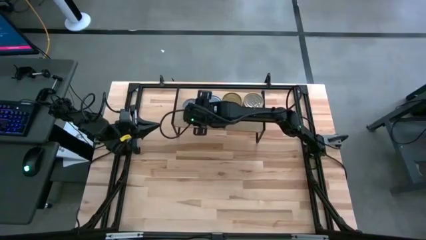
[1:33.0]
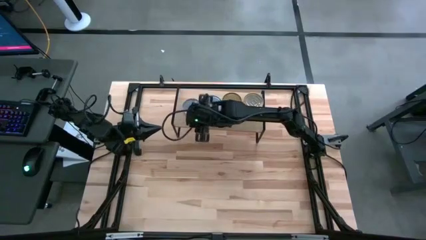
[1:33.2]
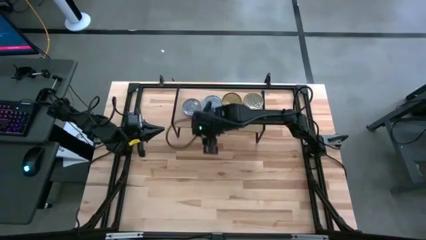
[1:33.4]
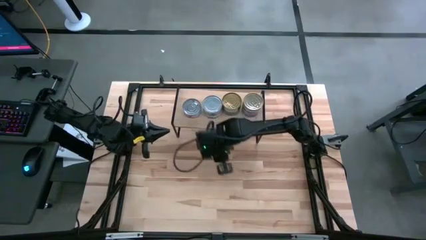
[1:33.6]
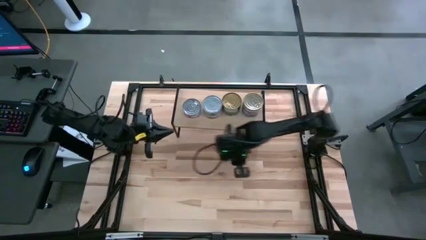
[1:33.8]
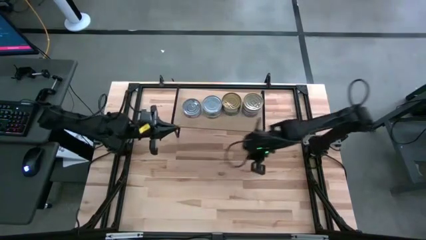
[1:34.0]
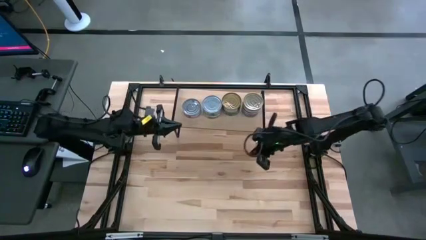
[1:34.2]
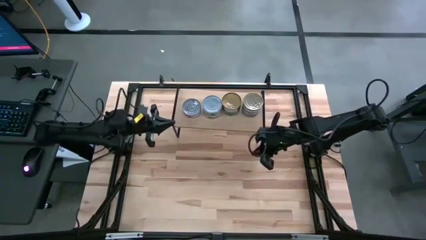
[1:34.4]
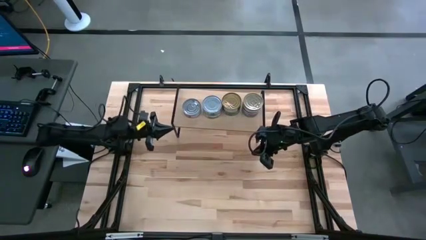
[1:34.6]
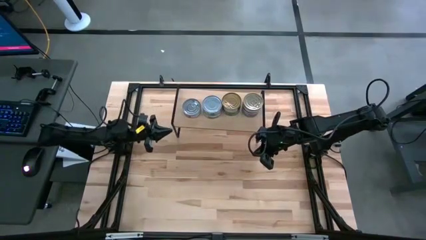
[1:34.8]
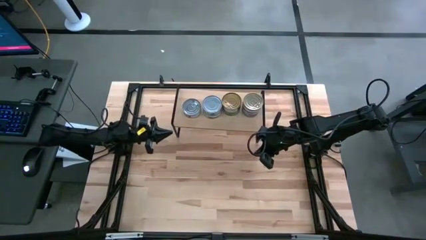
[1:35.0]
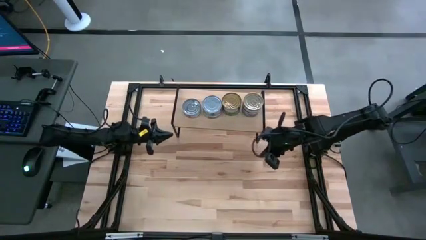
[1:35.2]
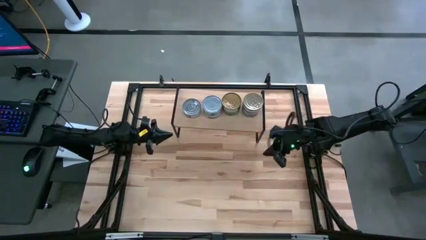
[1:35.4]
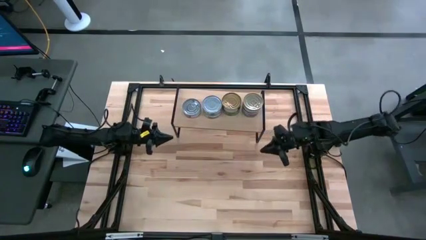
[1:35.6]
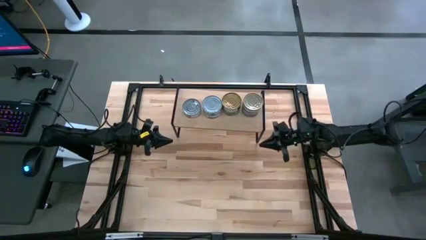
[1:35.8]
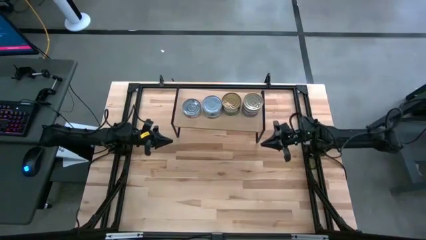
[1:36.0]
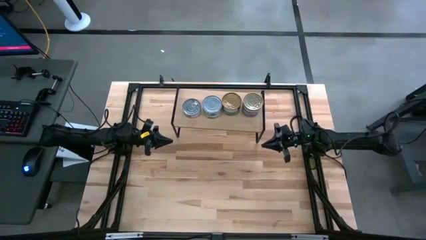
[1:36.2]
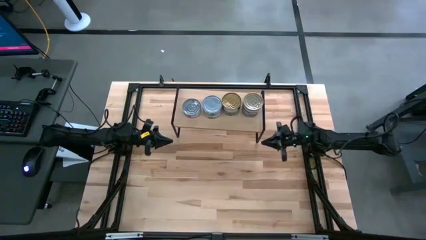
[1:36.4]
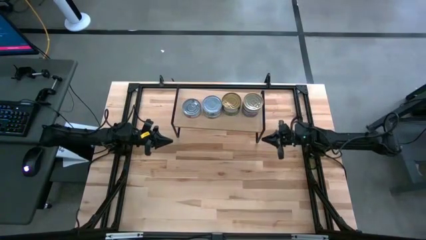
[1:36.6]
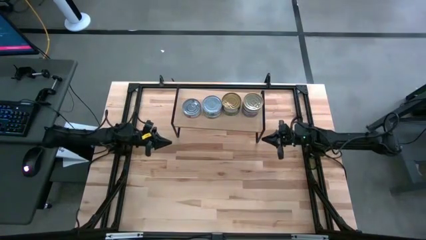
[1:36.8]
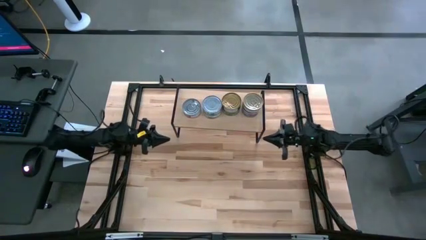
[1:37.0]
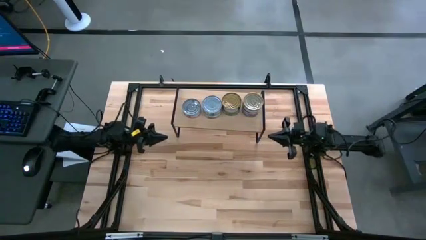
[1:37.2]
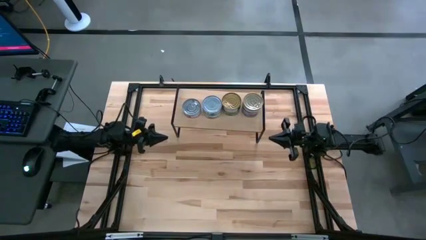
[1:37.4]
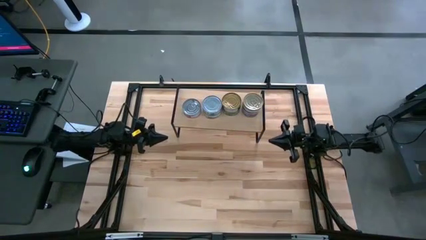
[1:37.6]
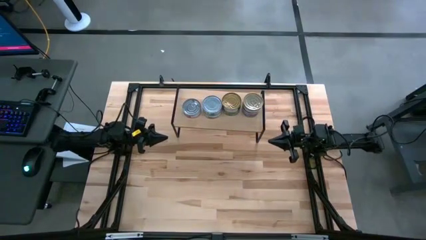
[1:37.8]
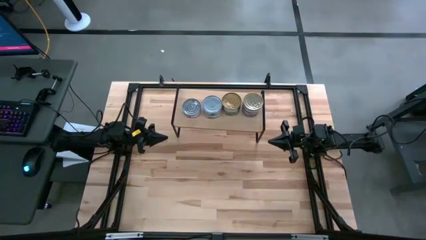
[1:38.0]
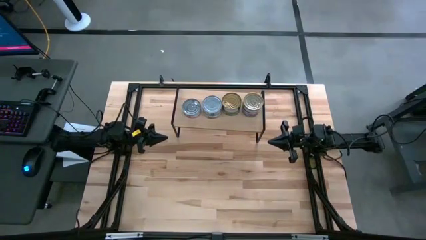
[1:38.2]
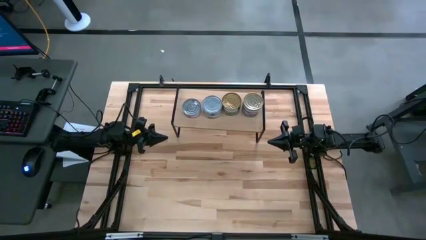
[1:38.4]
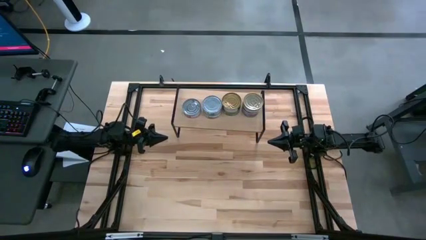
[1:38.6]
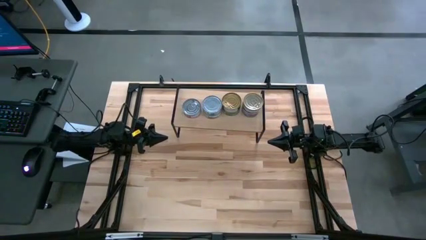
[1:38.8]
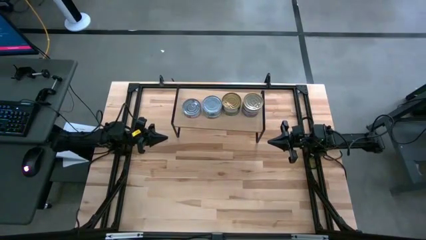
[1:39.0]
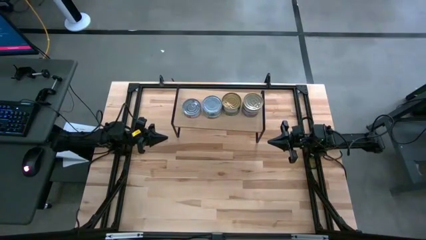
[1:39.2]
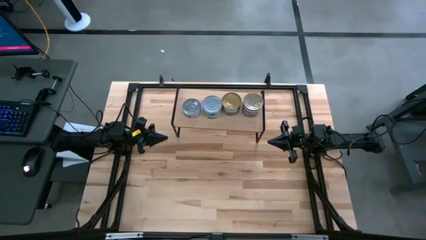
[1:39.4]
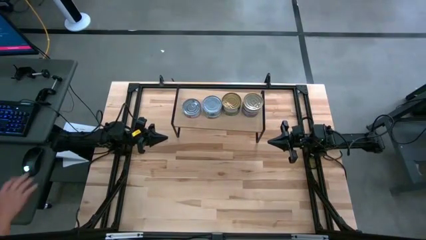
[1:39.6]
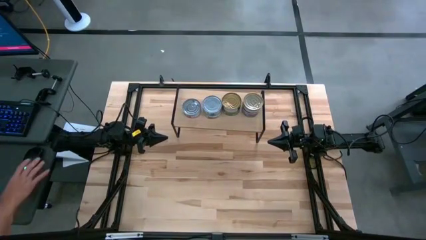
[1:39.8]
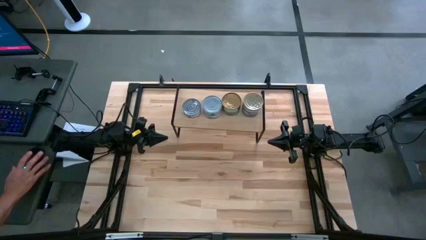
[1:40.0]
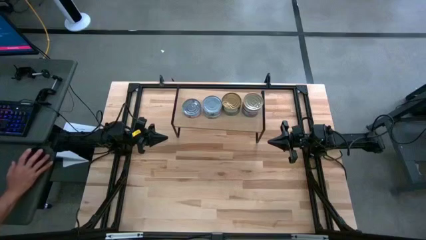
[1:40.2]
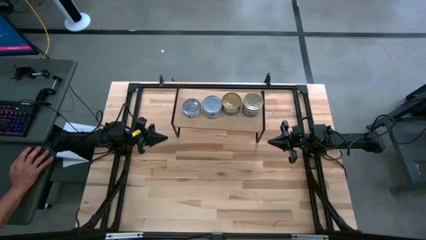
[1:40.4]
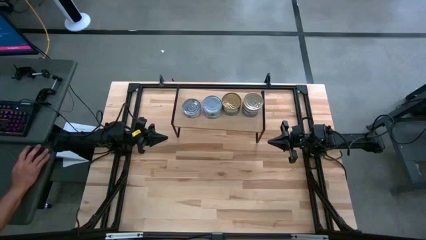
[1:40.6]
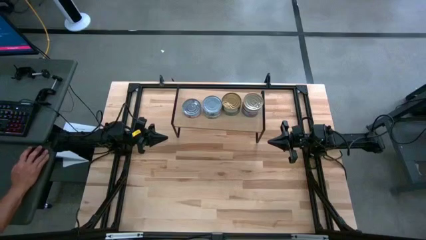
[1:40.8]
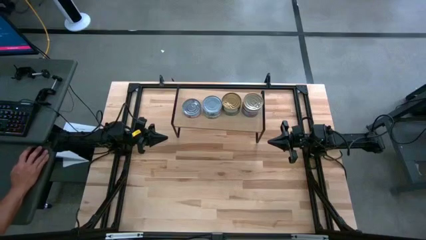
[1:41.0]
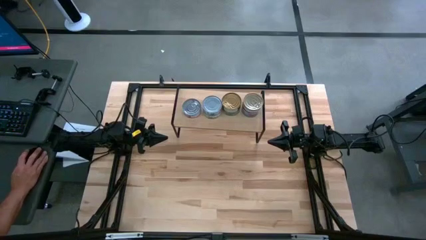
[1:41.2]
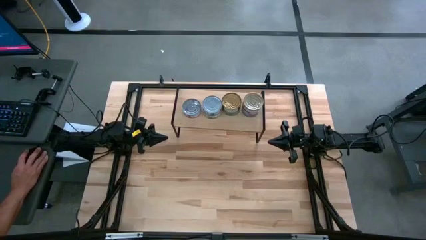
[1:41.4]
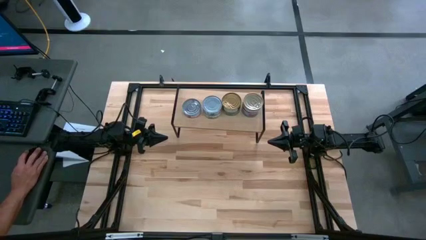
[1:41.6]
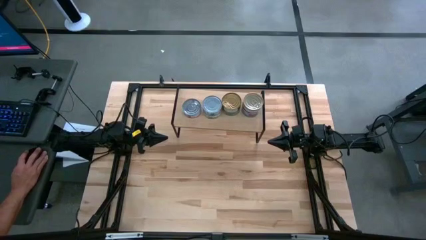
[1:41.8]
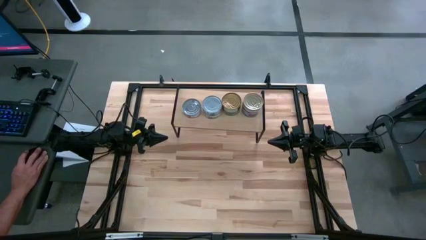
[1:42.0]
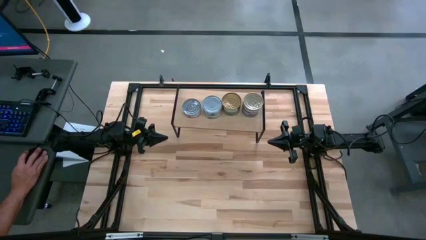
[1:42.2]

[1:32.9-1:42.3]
Task: Stack canned seafood by type on shelf
Return to Home Position

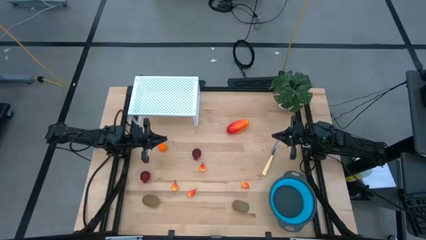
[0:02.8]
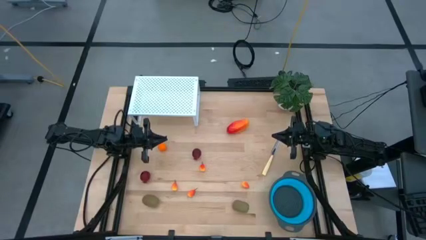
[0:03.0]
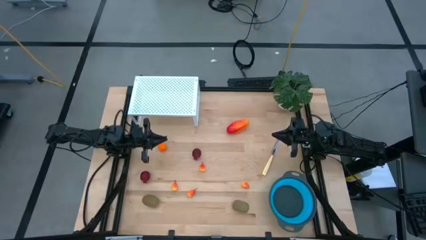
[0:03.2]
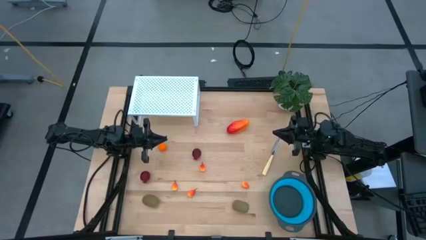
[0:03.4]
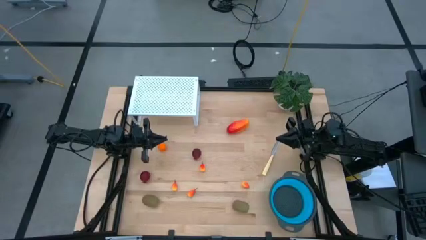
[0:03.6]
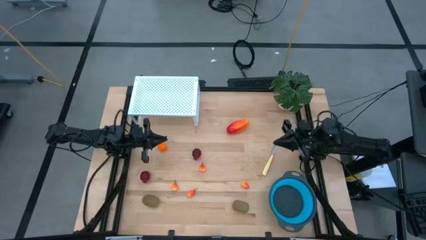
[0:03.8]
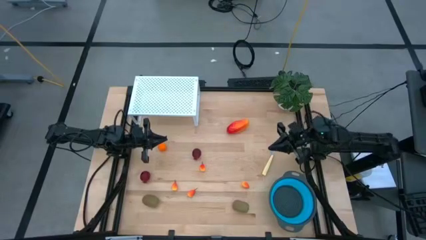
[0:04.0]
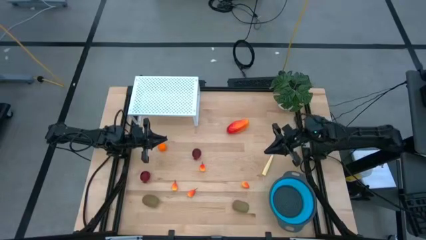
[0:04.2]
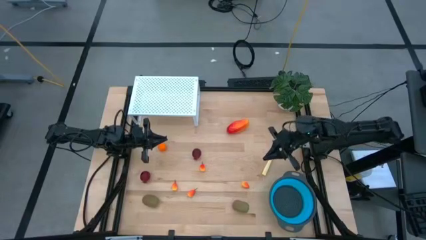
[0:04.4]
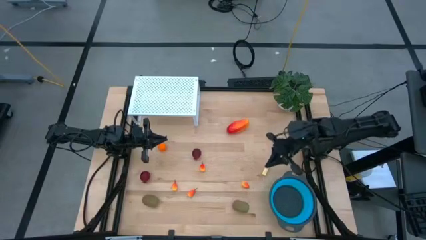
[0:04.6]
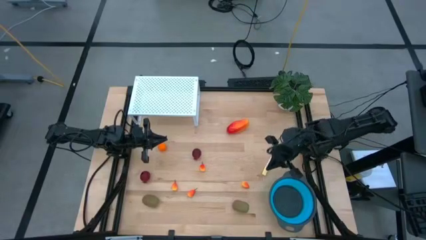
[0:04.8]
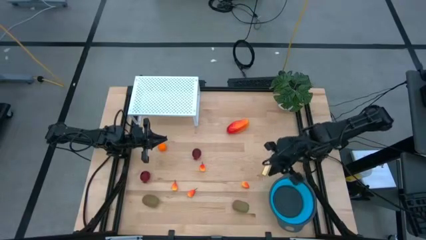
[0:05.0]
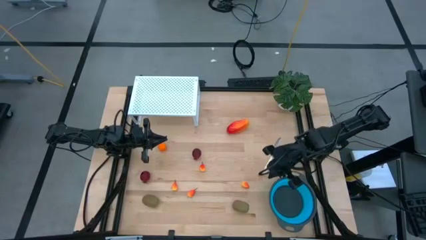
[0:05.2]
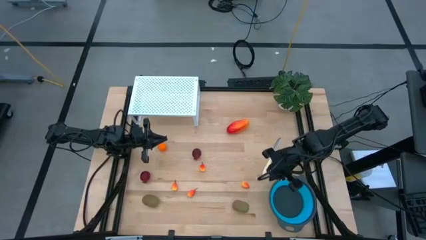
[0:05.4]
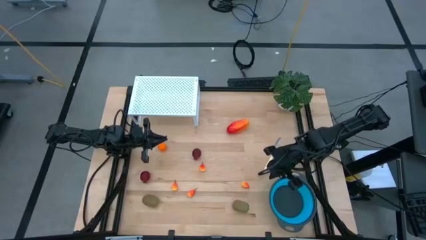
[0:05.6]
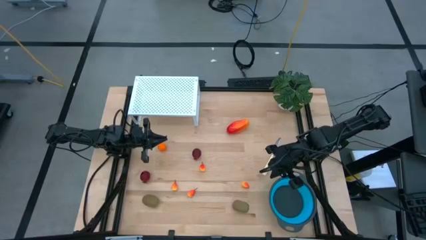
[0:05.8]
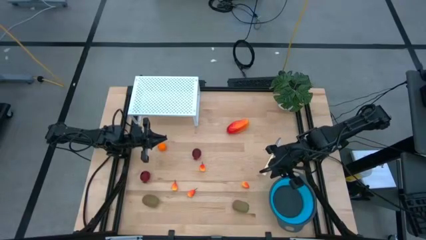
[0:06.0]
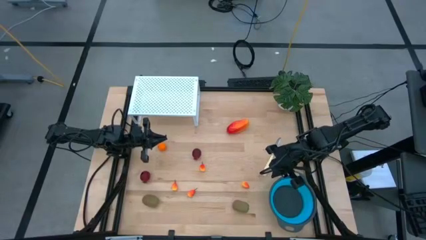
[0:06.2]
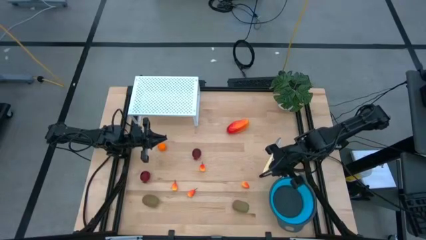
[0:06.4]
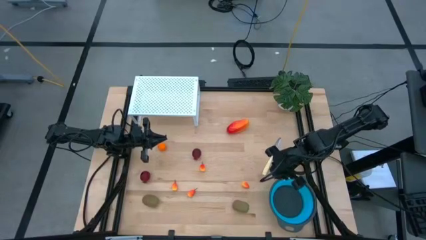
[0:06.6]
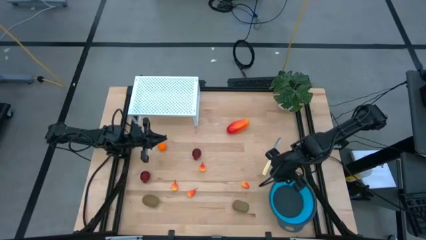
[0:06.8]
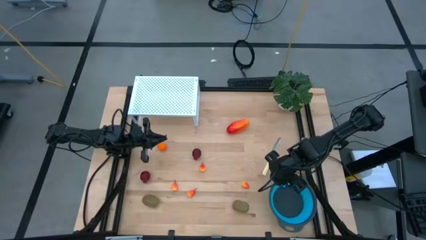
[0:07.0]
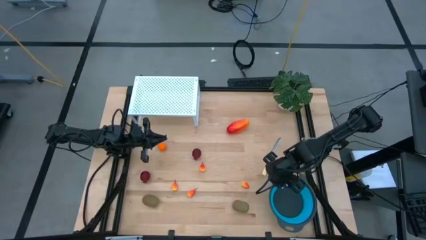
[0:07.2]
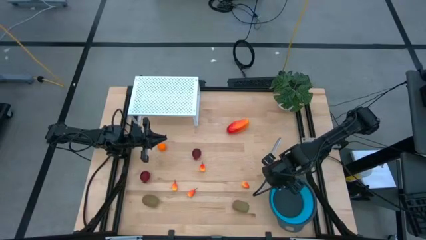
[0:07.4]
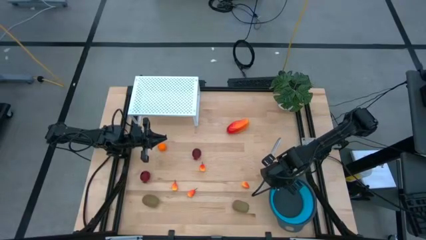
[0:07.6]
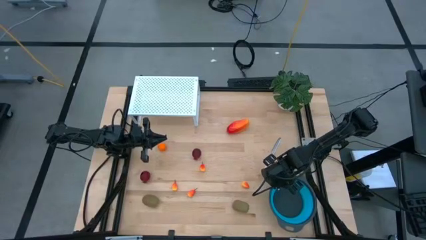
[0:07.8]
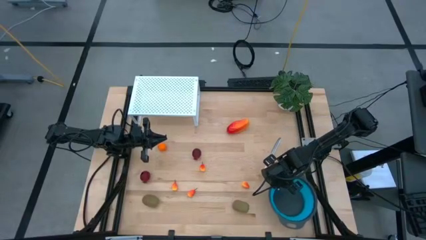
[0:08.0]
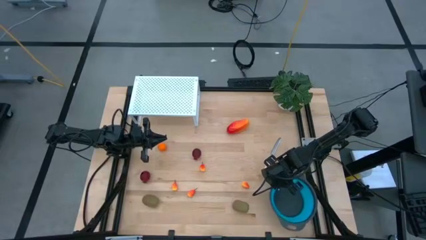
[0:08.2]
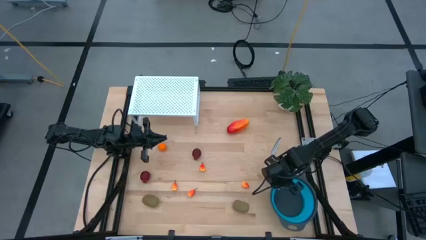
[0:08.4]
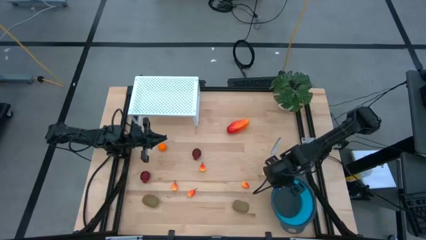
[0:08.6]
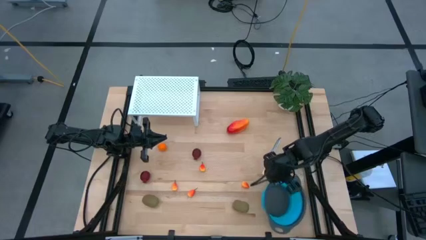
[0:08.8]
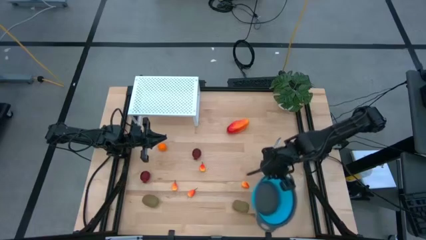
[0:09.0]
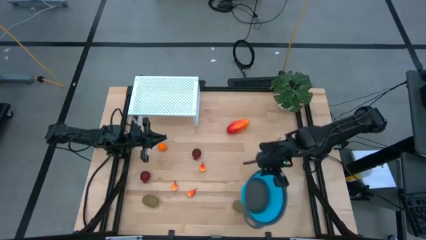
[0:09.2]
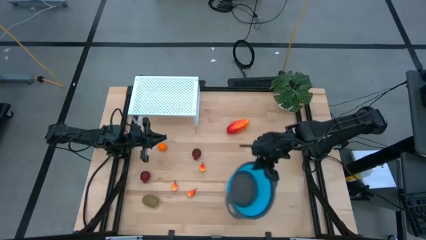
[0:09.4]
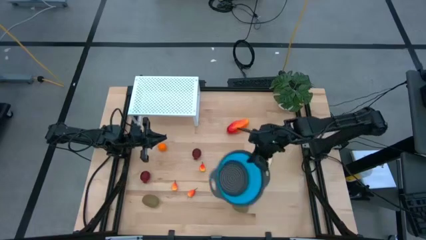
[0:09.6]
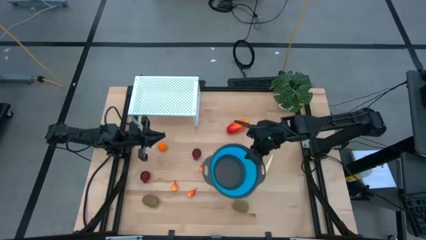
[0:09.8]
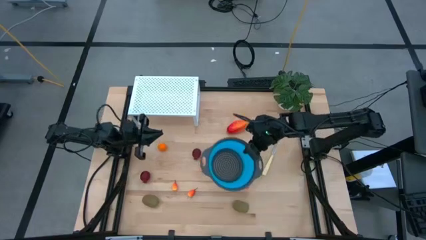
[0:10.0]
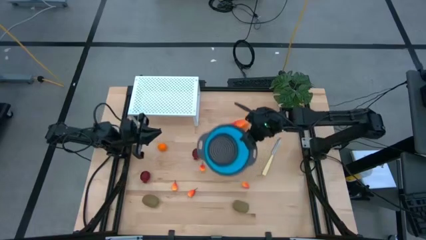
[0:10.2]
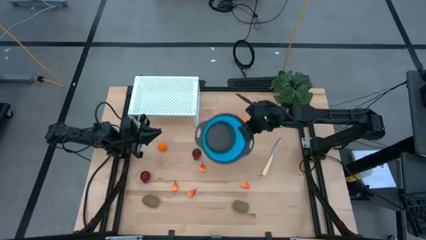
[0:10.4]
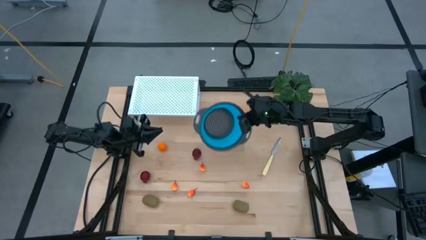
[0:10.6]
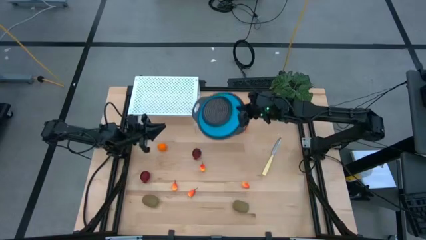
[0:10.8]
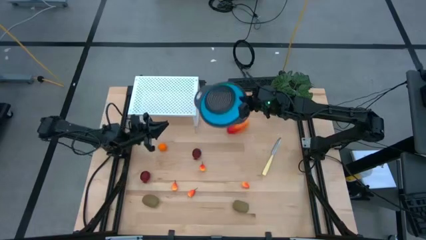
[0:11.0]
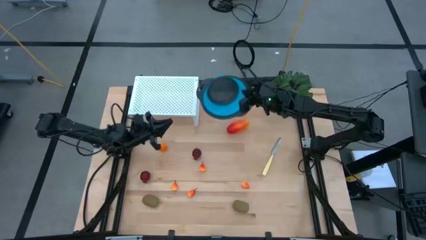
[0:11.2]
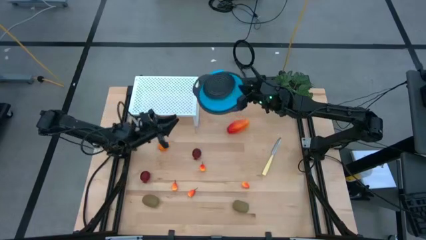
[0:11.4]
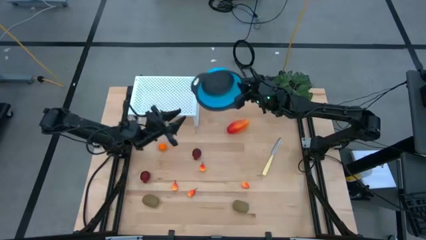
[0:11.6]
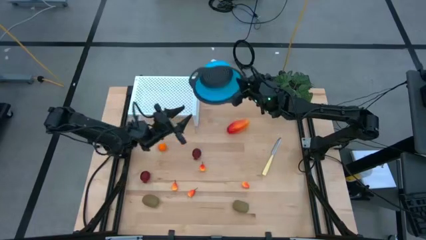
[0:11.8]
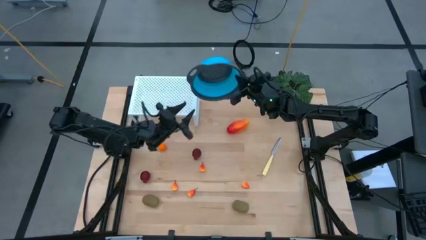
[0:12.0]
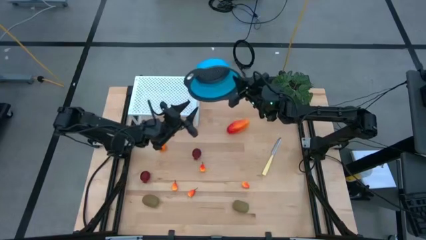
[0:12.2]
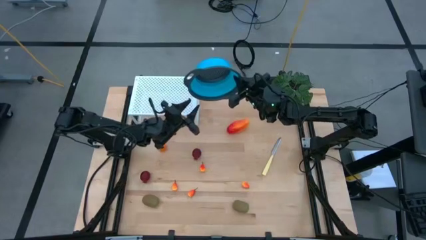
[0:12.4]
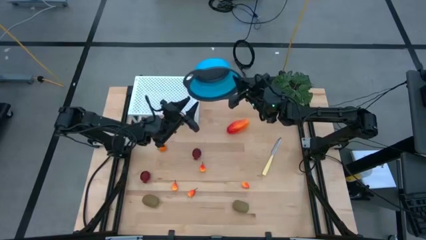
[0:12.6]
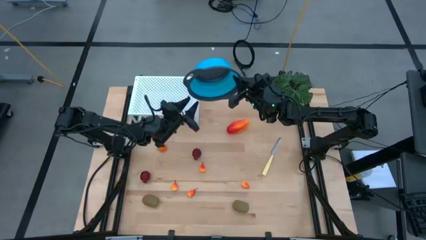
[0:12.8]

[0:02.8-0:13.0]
Task: Pick & Place Fruit
Put the blue strainer bowl on the shelf
